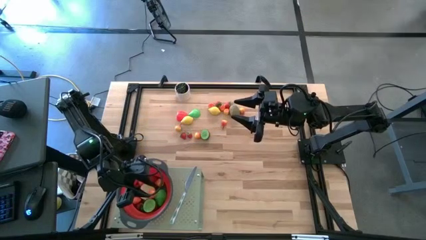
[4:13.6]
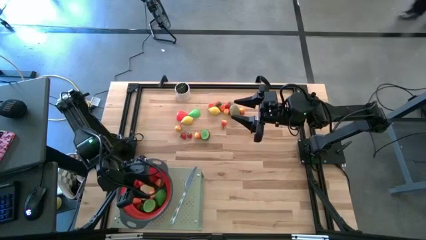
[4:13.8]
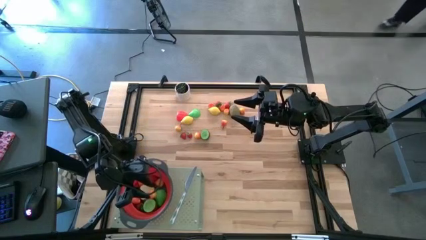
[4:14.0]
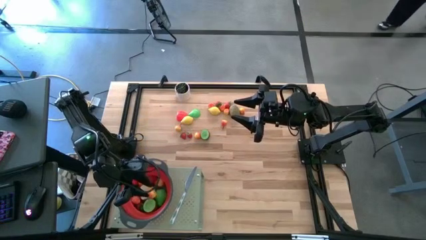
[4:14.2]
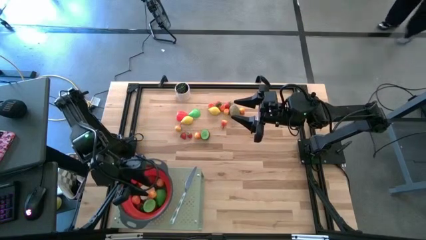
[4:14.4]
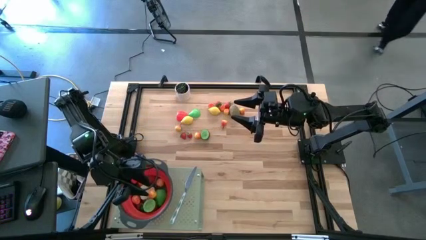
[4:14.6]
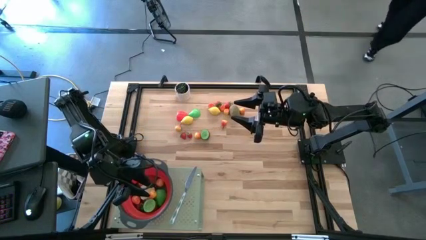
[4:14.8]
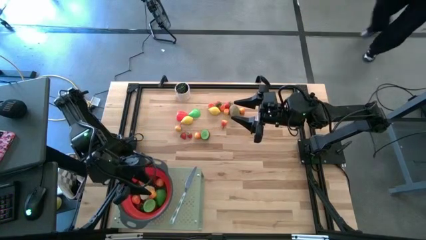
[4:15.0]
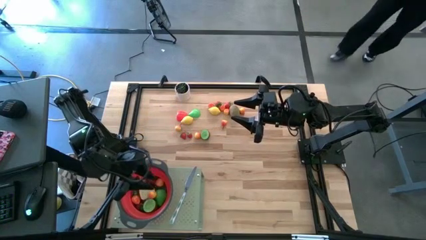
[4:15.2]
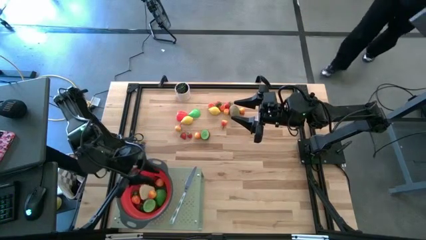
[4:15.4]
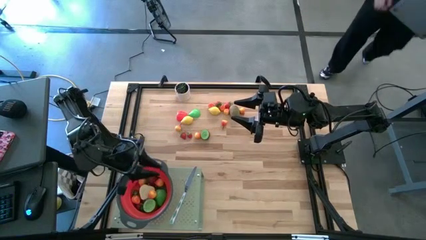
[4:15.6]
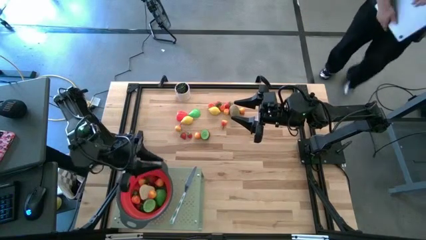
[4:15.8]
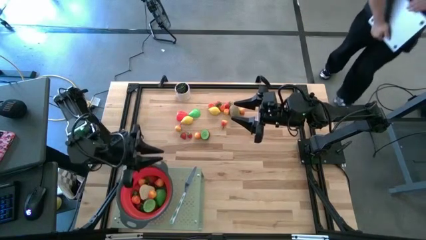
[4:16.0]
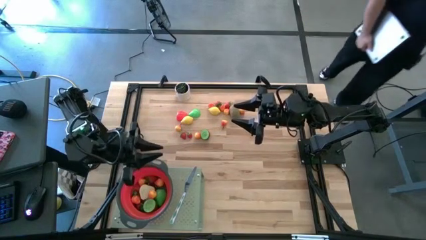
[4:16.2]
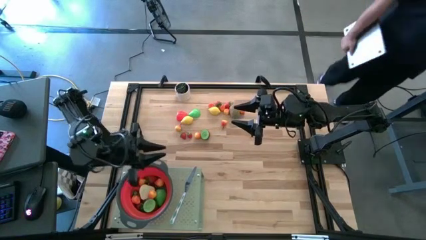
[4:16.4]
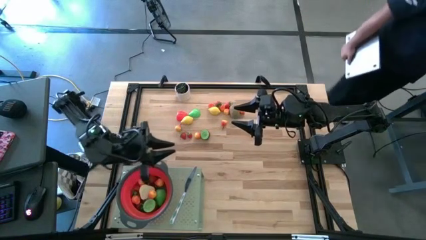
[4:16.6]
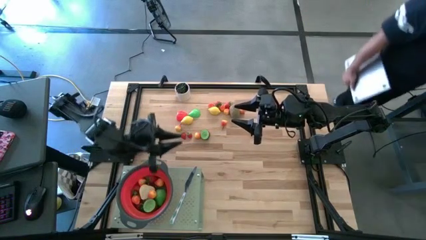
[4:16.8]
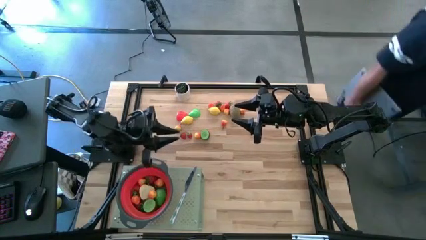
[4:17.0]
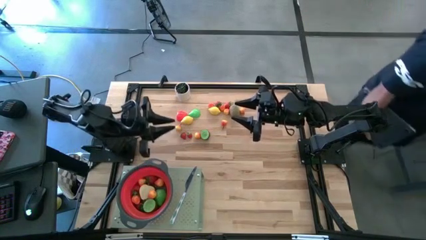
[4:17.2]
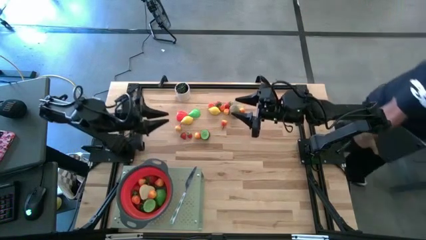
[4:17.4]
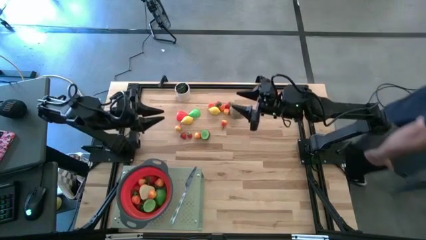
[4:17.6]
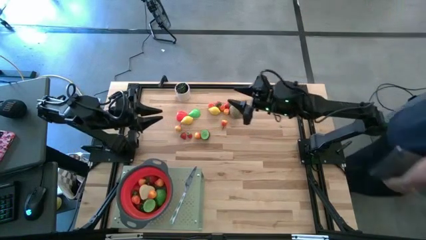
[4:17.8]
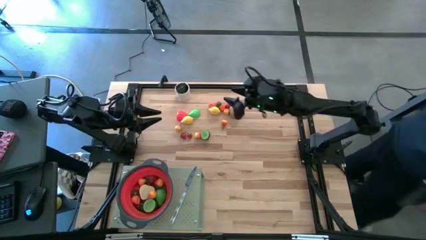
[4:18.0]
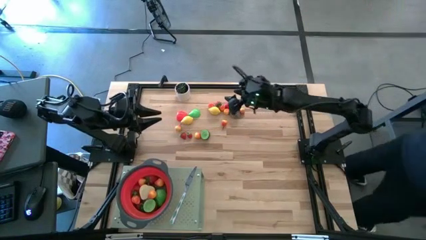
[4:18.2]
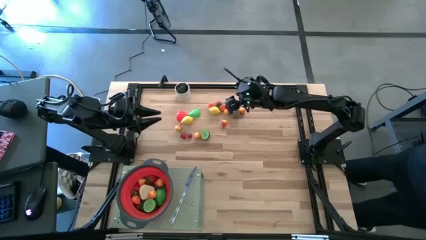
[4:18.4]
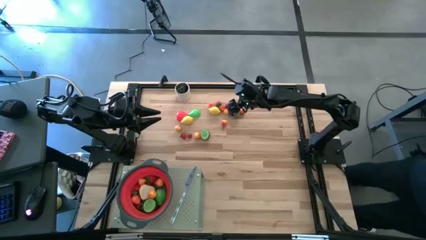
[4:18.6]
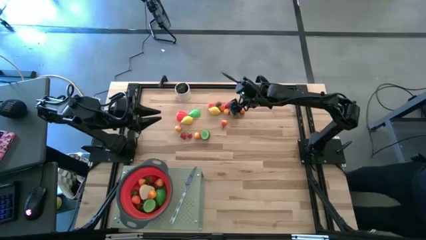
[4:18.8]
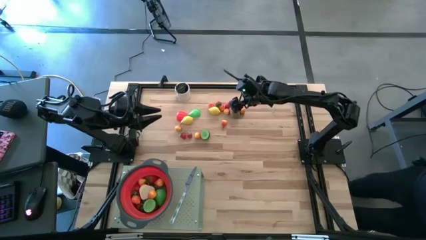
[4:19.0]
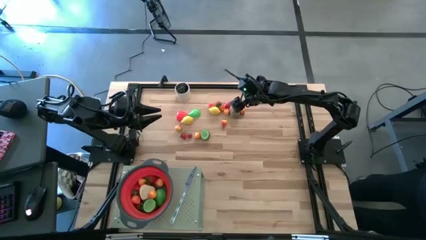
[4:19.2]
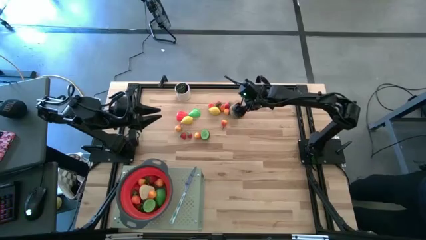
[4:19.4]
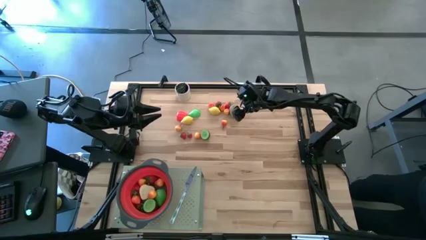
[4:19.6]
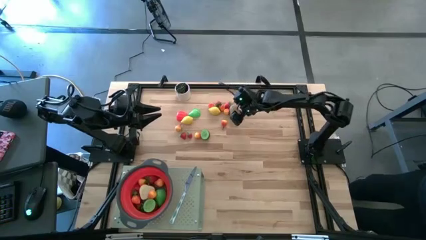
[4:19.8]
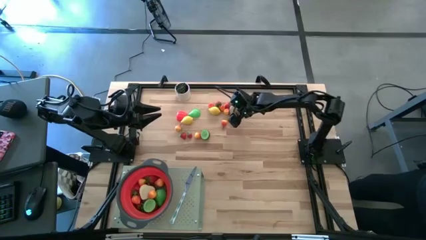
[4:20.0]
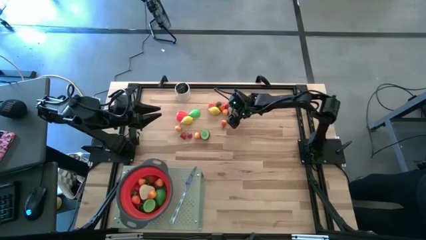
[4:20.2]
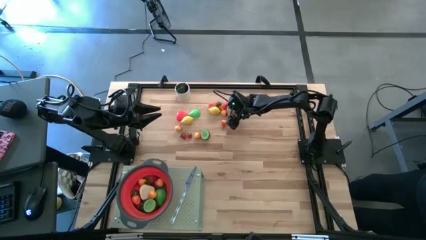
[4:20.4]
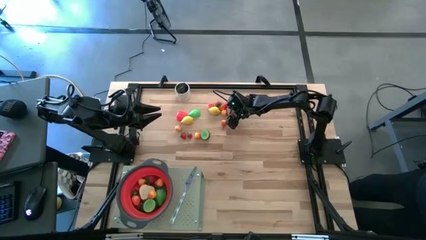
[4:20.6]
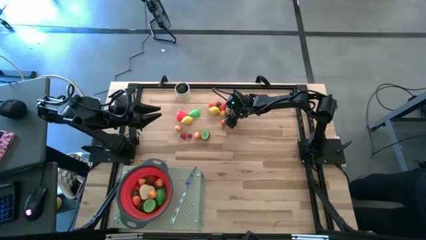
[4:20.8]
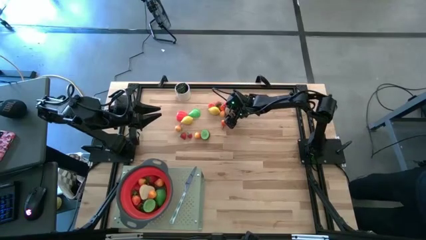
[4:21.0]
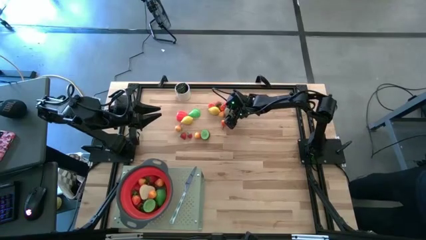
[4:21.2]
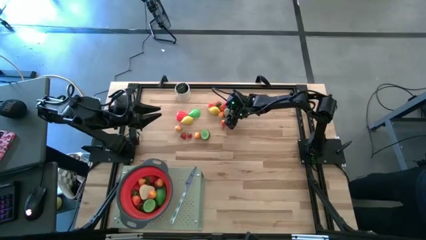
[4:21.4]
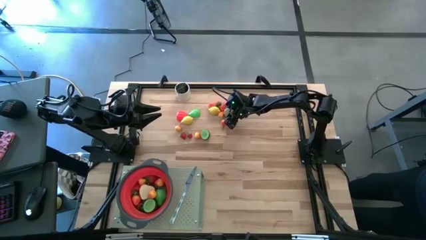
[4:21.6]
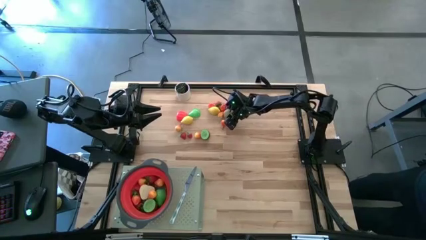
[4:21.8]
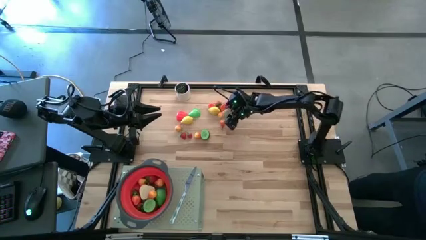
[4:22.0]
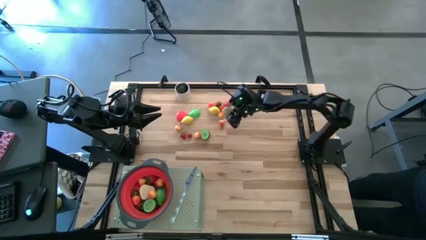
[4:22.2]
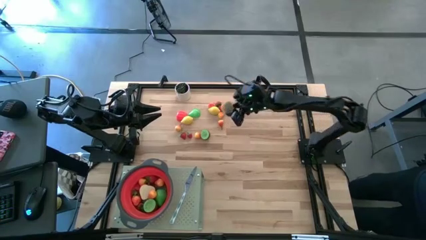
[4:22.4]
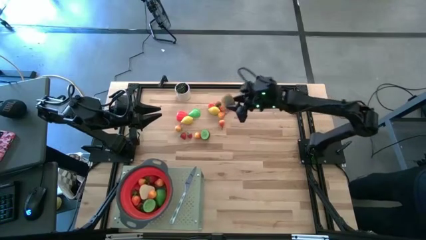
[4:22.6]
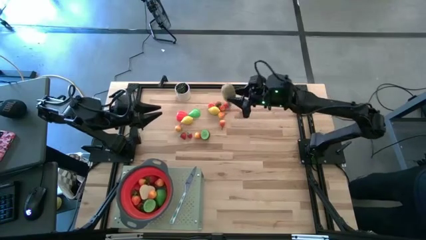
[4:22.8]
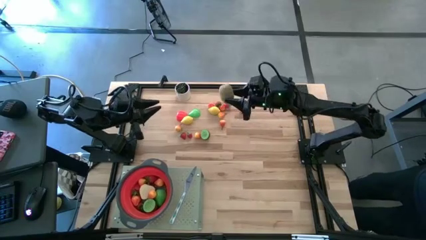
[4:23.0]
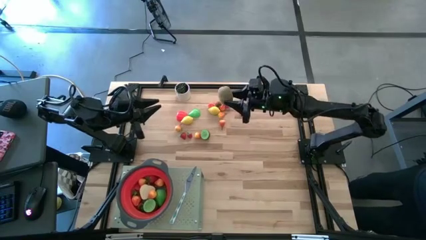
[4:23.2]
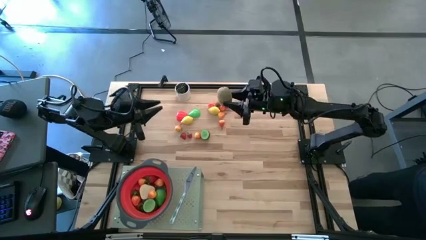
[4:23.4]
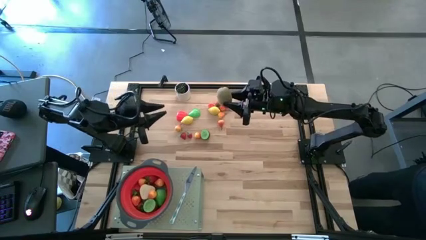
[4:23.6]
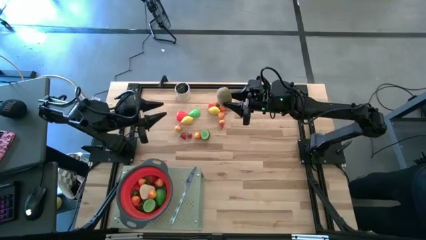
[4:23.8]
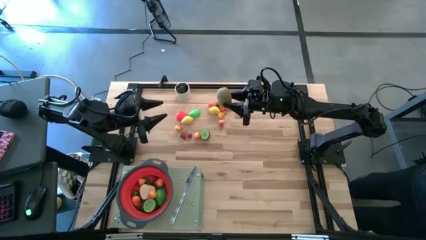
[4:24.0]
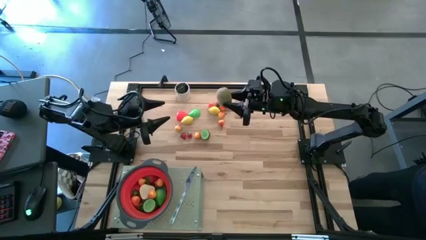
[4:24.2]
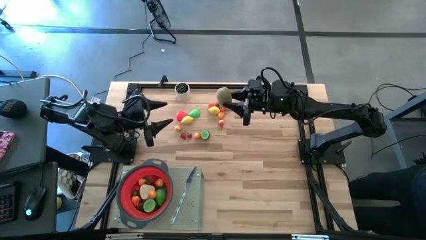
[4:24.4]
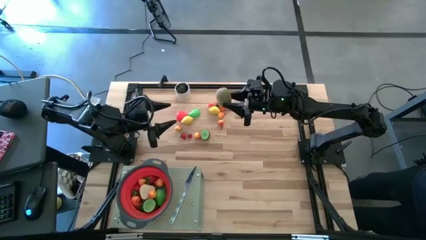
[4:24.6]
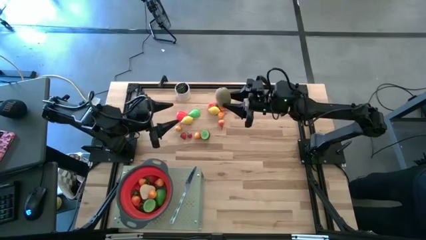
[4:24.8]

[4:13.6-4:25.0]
Task: Pick & Place Fruit
Put the kiwi into the red strainer bowl on the shelf

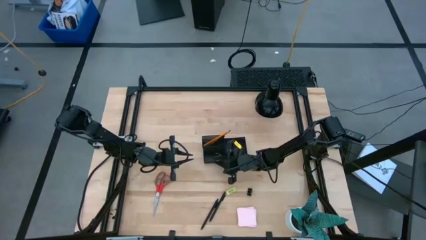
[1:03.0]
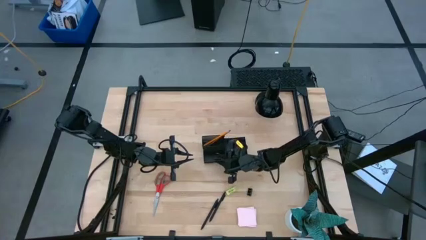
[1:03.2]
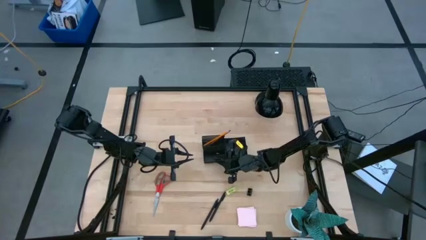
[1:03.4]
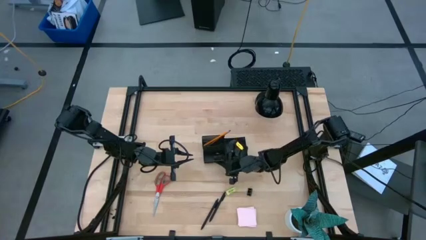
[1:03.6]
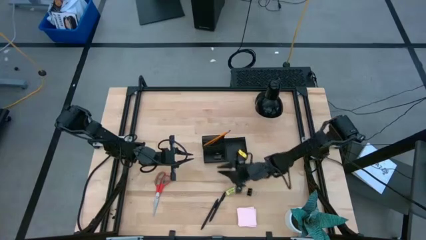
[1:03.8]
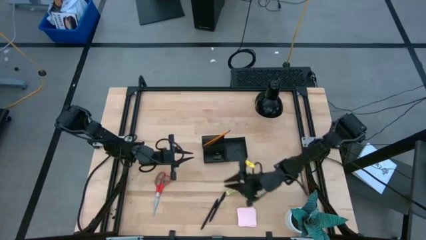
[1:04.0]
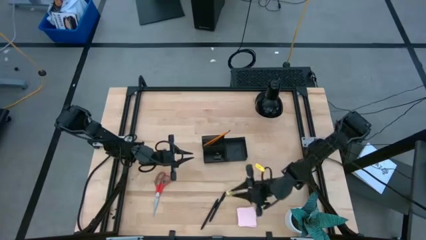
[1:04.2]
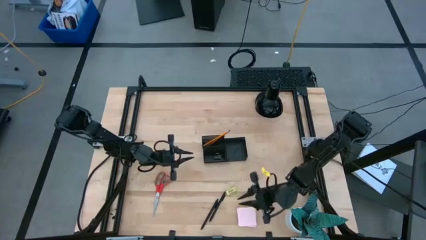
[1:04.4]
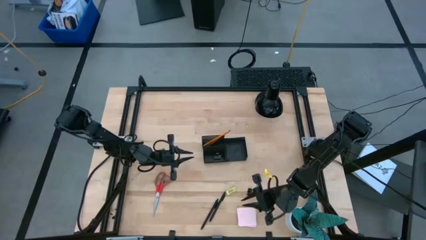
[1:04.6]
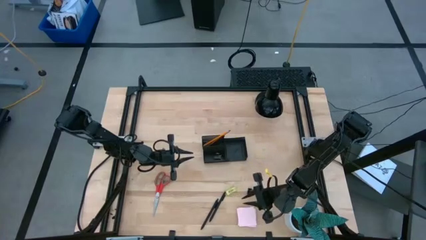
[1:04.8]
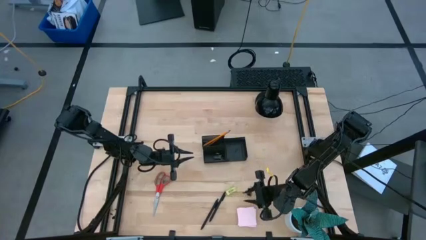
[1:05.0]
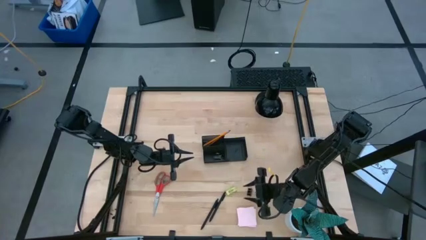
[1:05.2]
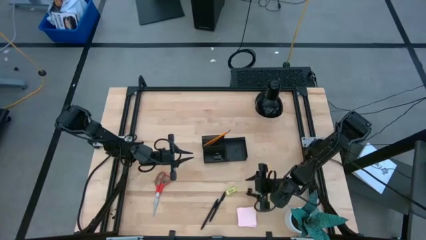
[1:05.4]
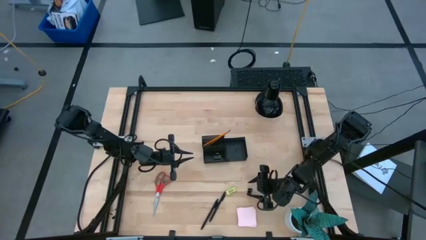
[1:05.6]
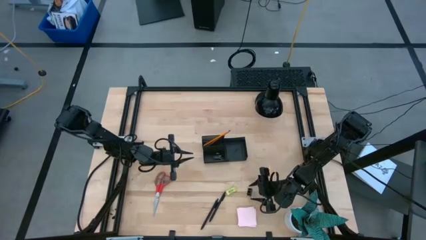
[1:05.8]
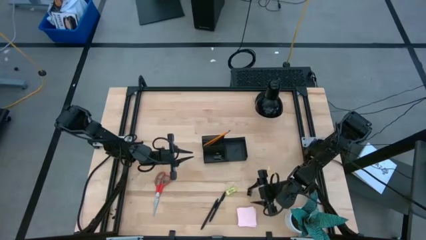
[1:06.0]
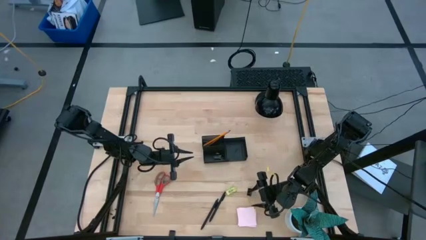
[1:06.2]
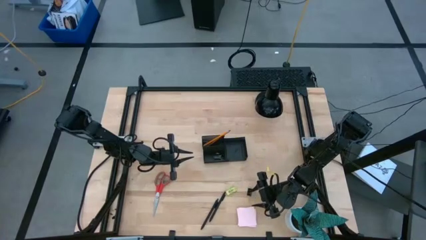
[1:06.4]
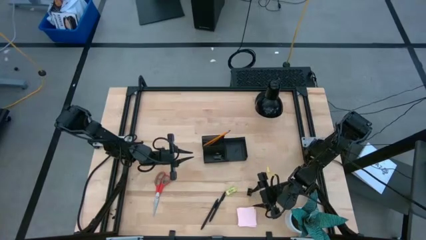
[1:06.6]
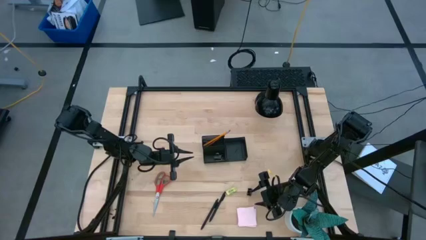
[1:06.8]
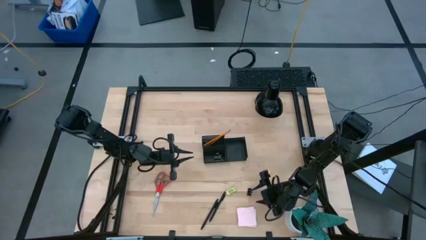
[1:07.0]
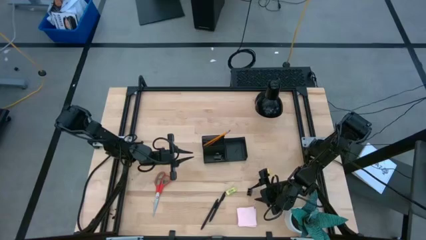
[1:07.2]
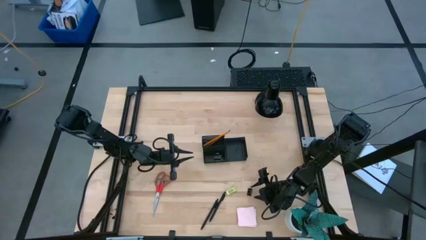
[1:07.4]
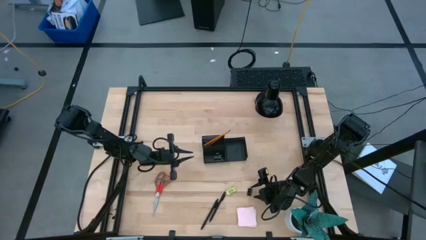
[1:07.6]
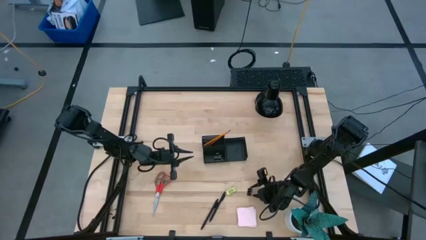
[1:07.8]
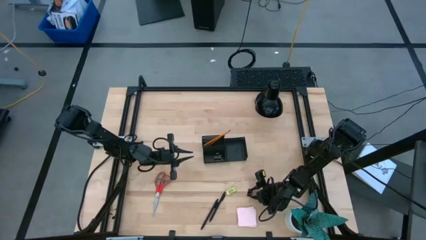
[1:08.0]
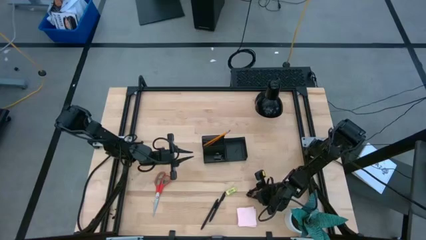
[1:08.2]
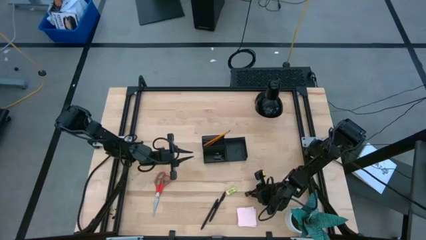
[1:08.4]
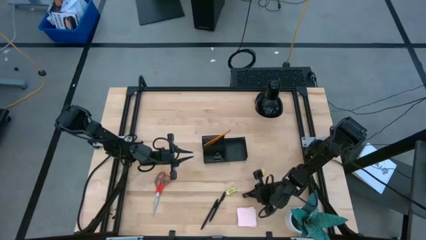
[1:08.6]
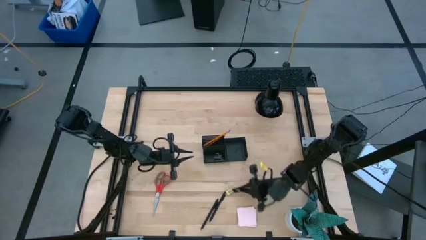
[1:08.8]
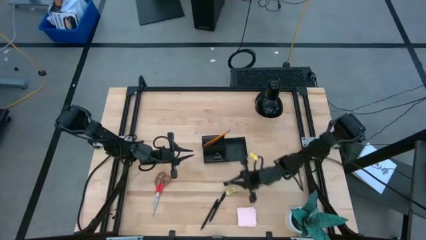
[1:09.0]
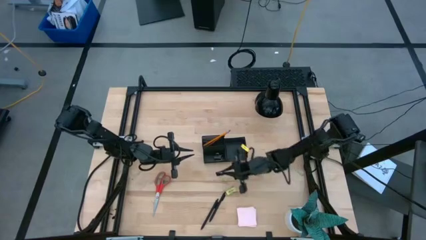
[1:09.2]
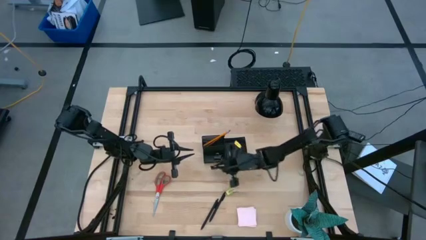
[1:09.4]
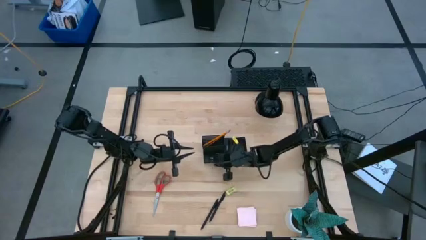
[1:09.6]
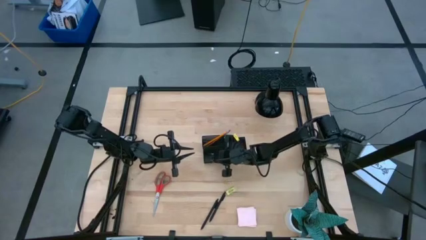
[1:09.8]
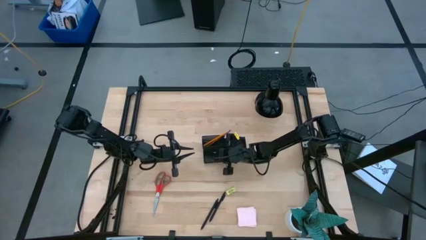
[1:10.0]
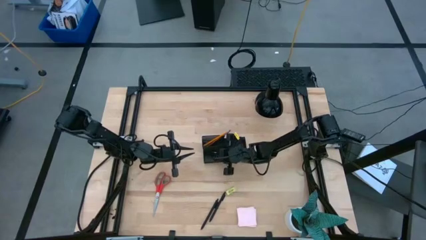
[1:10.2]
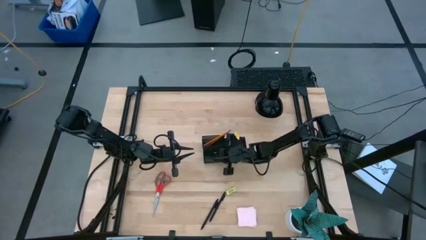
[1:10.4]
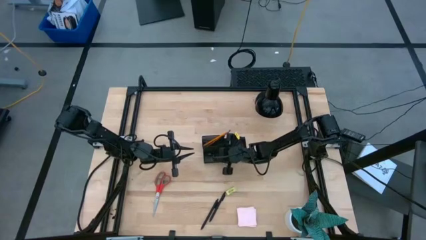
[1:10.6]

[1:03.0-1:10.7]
Task: Pick and place office supplies into organizer
Put the black binder clip into the black desk organizer
